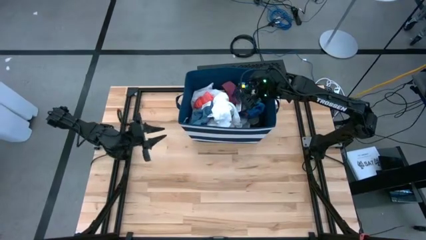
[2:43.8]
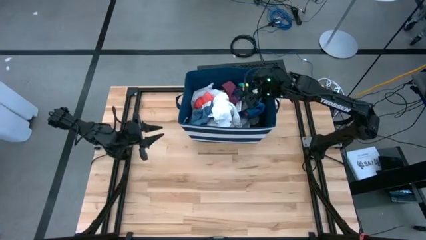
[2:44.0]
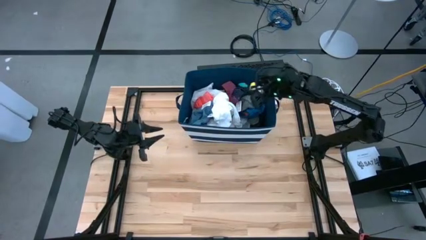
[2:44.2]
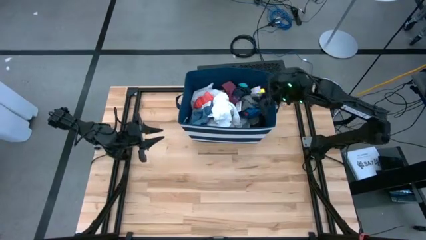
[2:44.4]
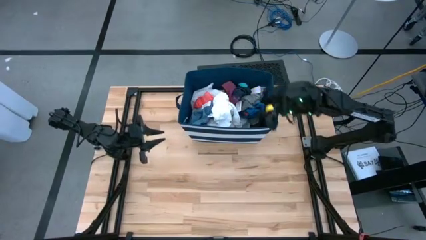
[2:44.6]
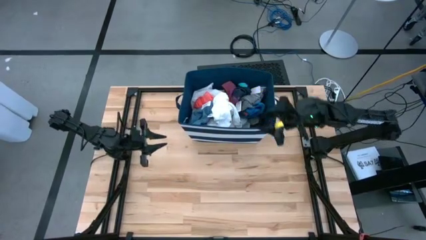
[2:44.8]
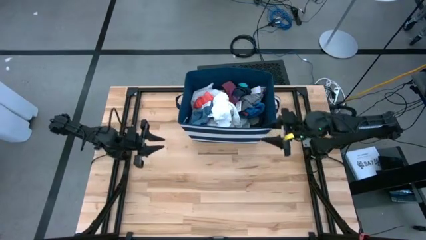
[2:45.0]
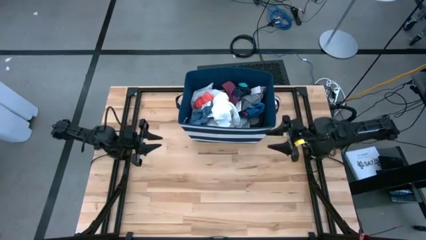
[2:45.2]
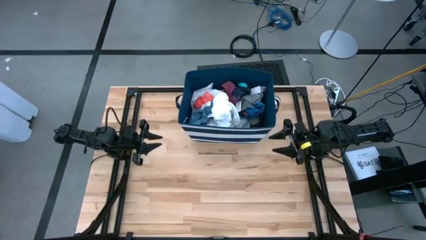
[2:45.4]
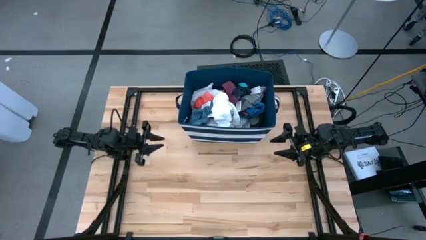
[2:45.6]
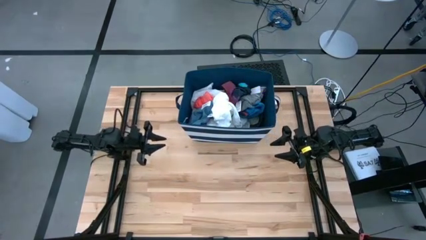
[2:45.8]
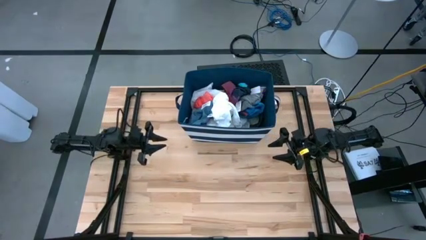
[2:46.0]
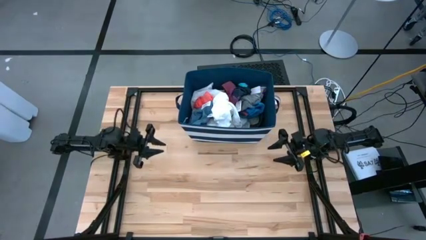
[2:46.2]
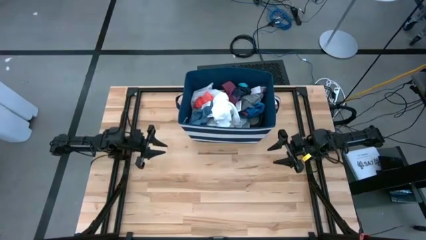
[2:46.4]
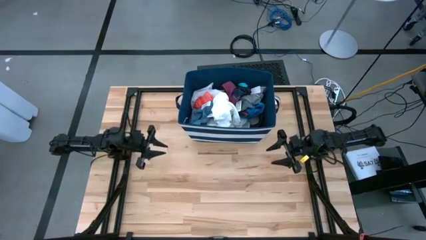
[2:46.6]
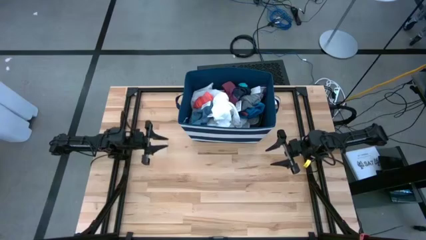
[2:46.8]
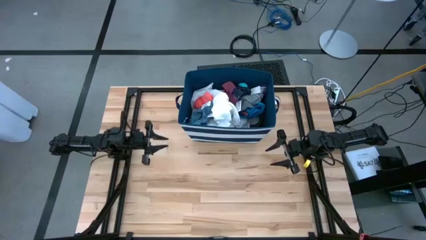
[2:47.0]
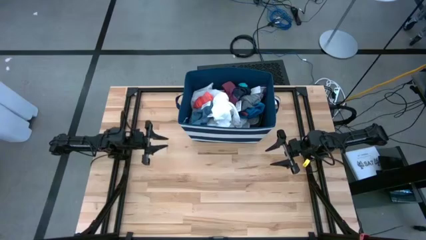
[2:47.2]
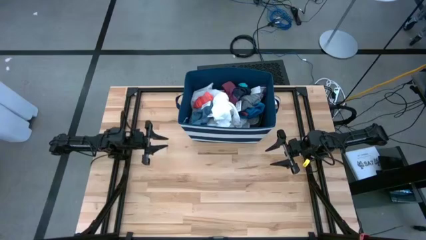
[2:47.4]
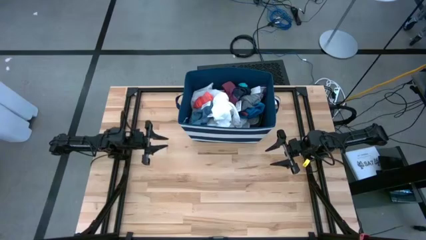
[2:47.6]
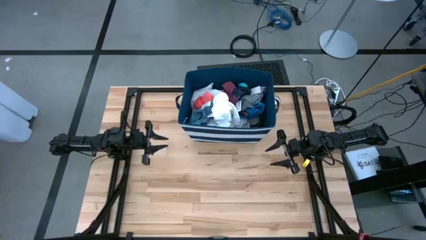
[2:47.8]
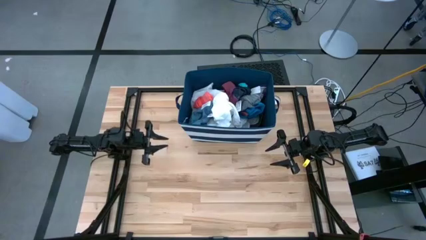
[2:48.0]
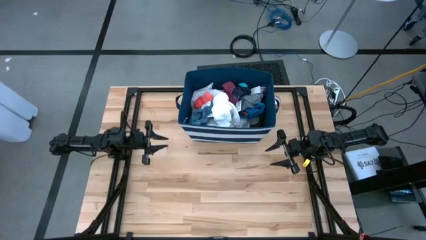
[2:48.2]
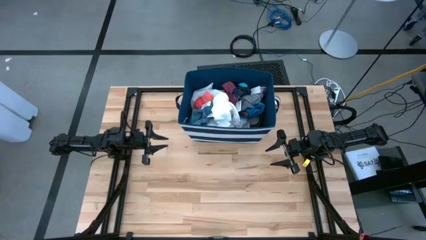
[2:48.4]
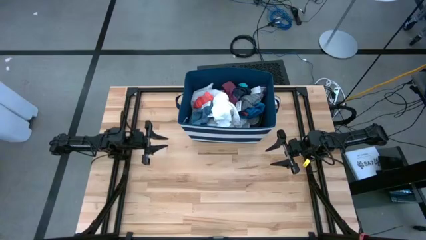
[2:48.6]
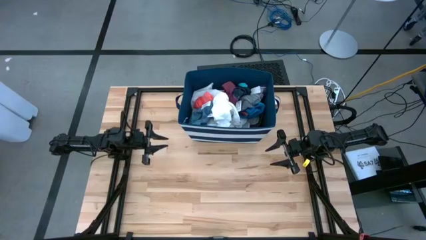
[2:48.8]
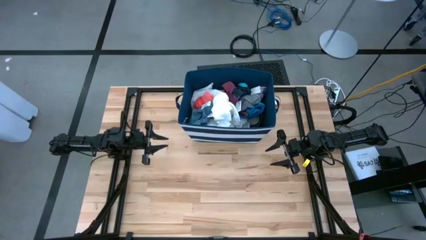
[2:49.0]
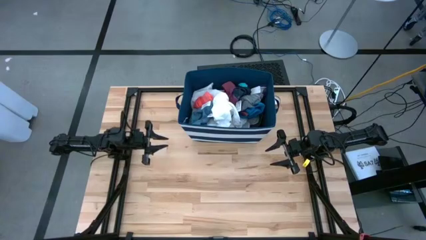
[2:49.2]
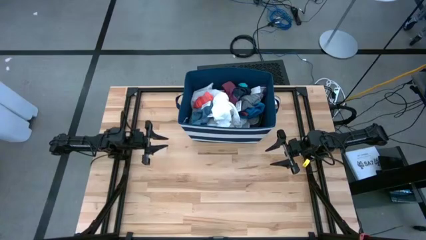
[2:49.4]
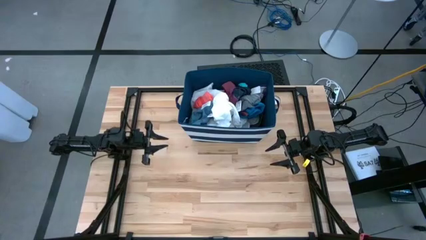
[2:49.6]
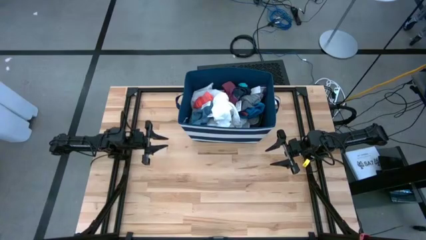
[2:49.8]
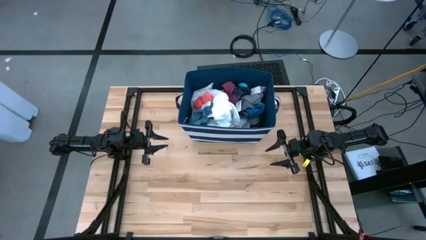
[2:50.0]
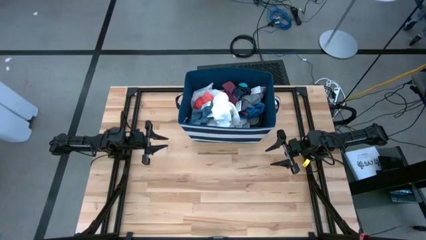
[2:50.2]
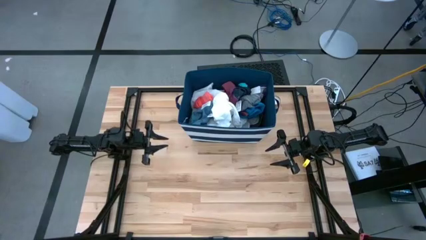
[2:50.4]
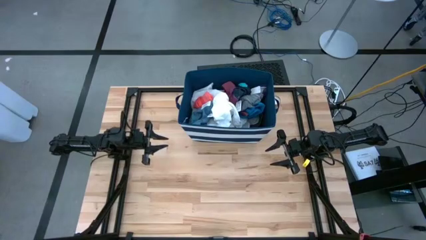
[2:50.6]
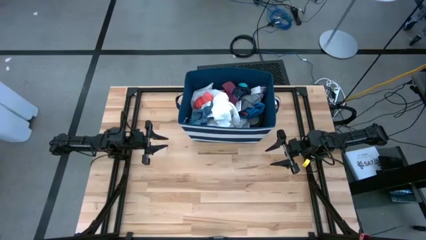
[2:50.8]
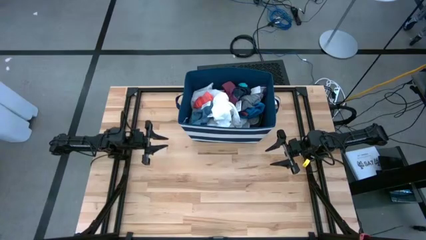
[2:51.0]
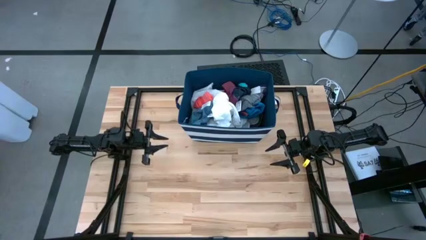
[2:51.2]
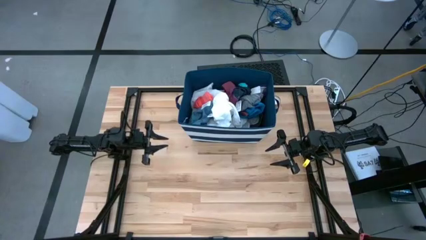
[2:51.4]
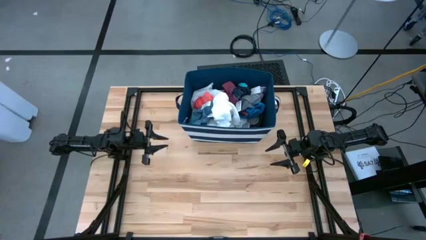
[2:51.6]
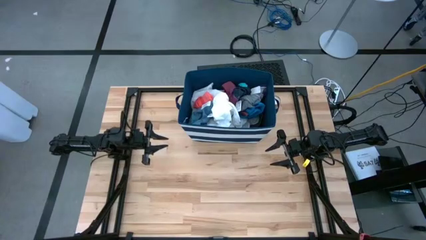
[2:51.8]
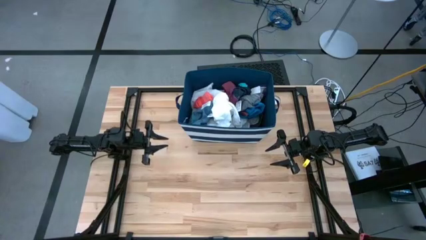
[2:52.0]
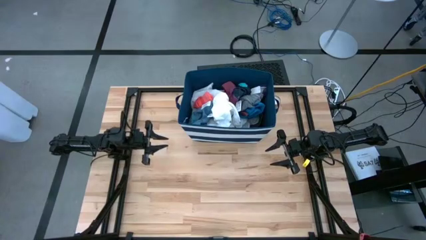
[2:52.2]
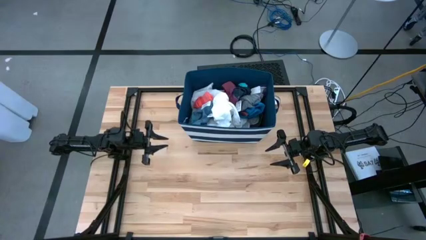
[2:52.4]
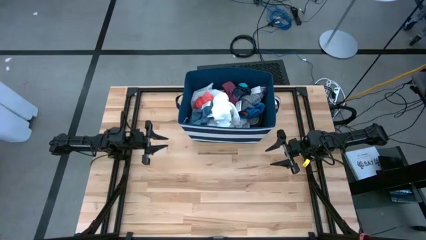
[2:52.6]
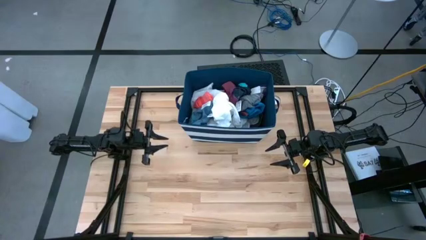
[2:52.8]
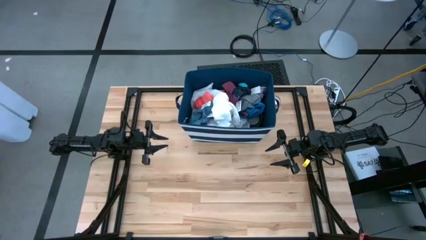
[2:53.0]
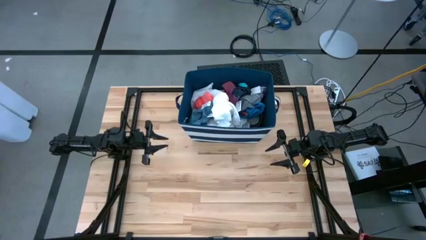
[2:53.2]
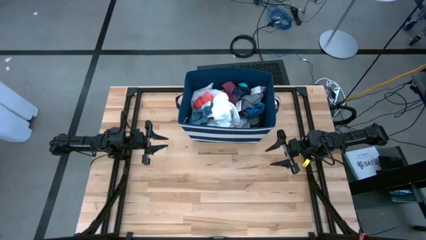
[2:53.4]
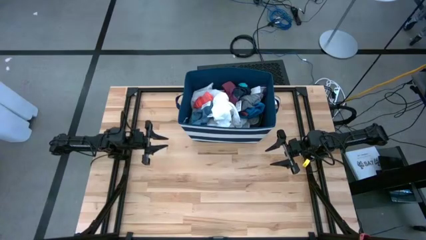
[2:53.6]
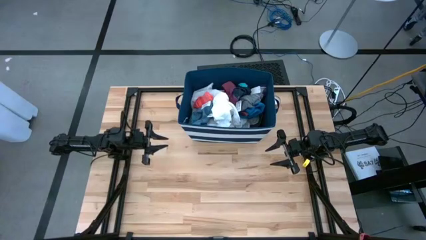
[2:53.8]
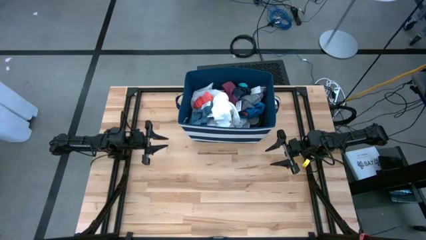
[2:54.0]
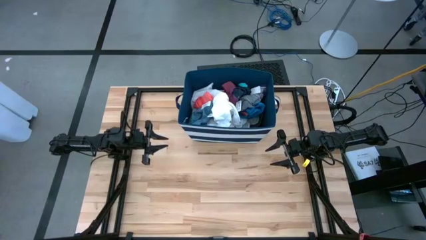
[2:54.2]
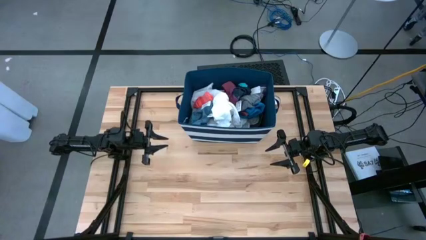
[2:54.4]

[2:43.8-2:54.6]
Task: Sort clothes
Return to Home Position
